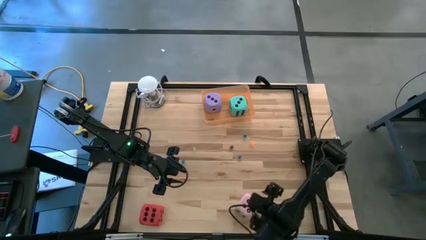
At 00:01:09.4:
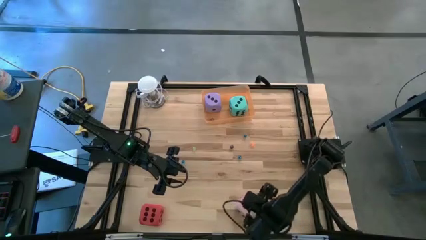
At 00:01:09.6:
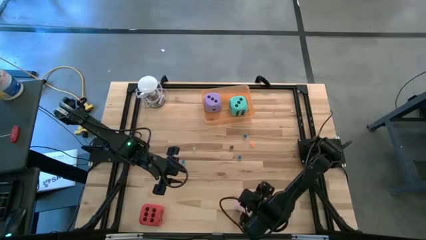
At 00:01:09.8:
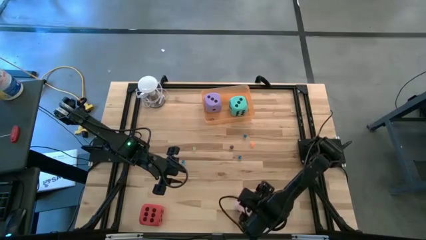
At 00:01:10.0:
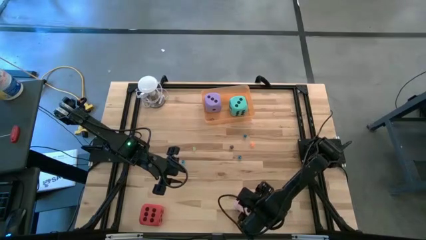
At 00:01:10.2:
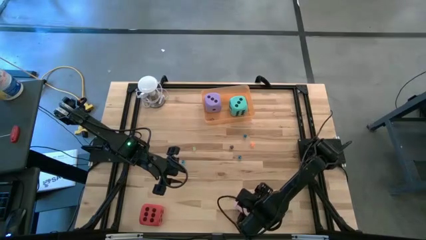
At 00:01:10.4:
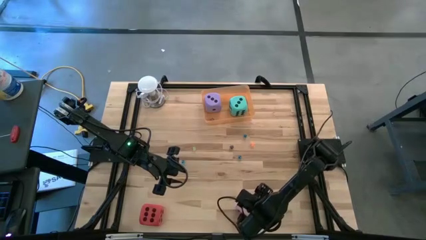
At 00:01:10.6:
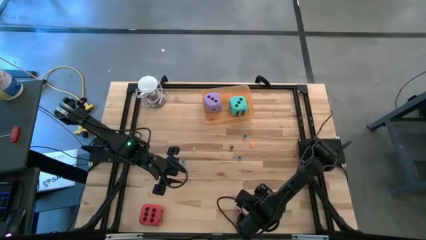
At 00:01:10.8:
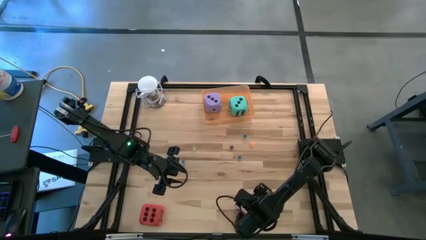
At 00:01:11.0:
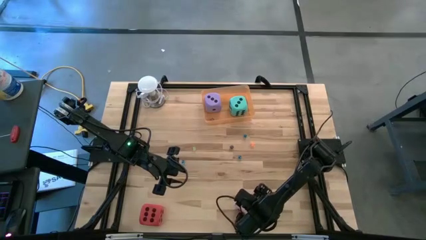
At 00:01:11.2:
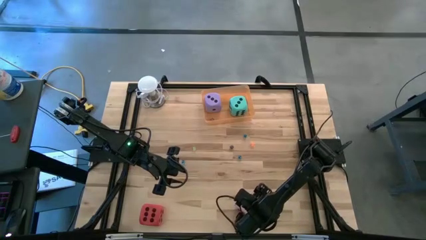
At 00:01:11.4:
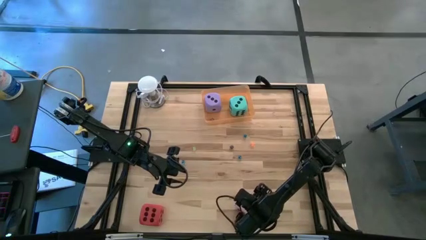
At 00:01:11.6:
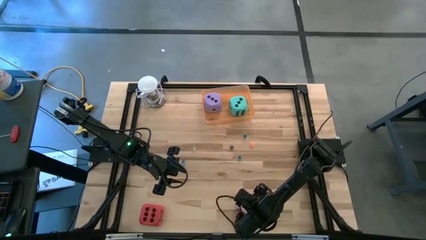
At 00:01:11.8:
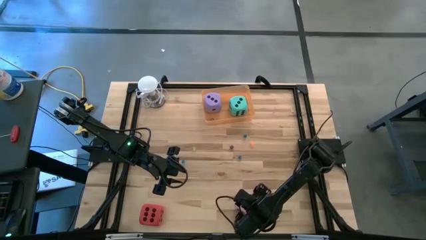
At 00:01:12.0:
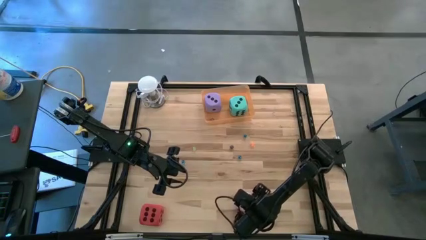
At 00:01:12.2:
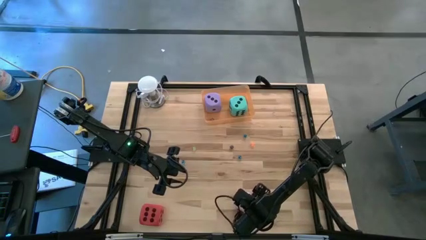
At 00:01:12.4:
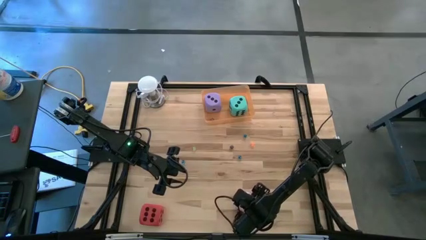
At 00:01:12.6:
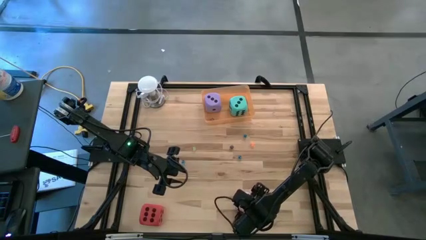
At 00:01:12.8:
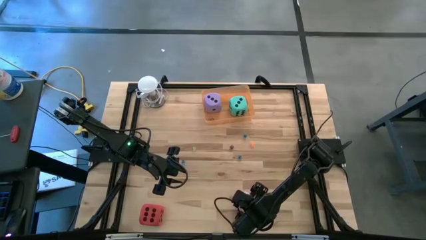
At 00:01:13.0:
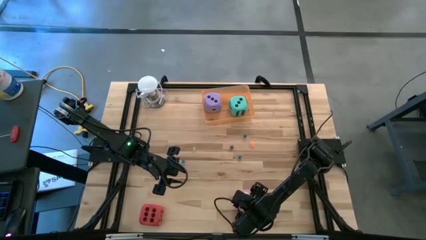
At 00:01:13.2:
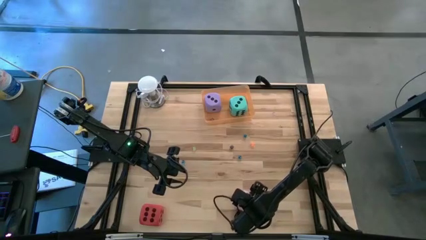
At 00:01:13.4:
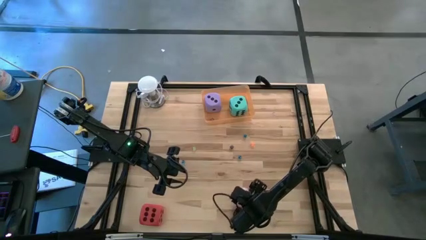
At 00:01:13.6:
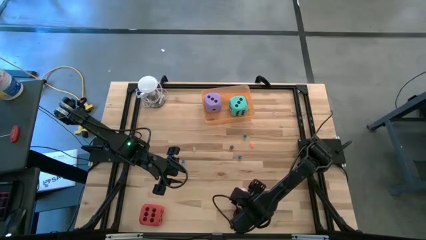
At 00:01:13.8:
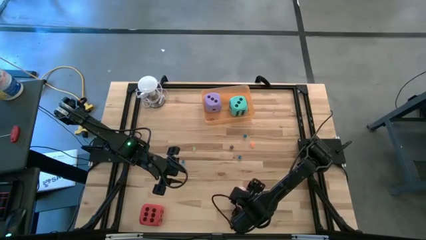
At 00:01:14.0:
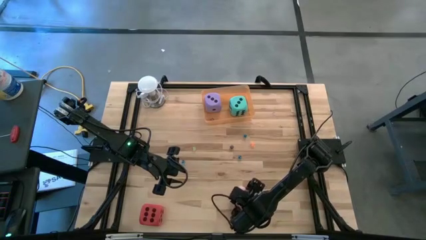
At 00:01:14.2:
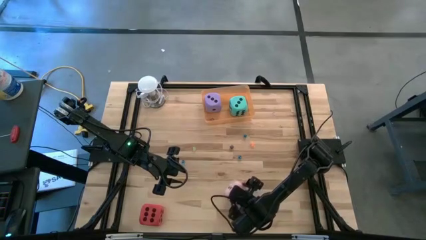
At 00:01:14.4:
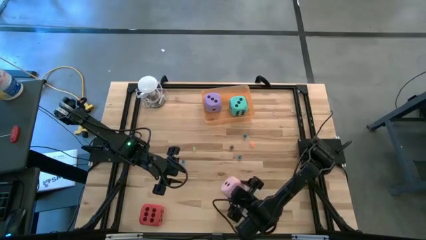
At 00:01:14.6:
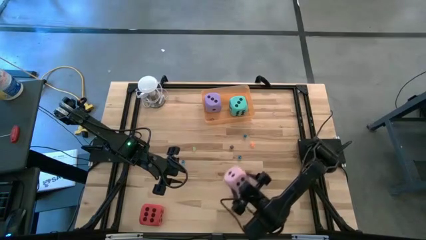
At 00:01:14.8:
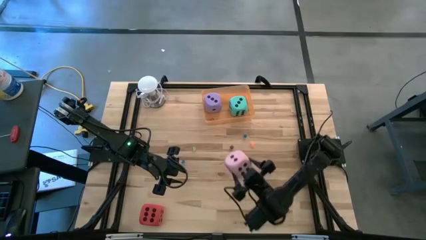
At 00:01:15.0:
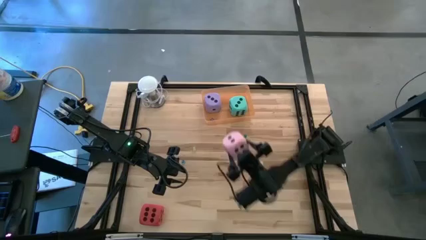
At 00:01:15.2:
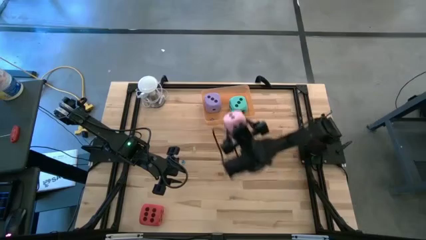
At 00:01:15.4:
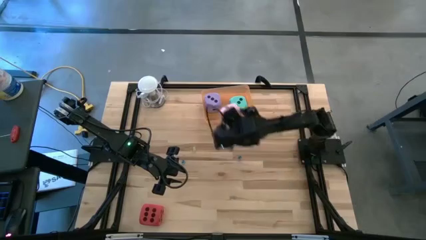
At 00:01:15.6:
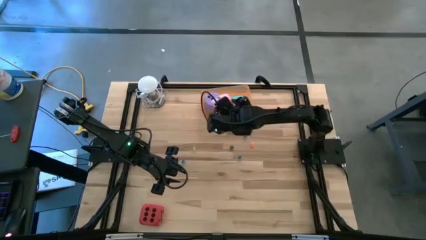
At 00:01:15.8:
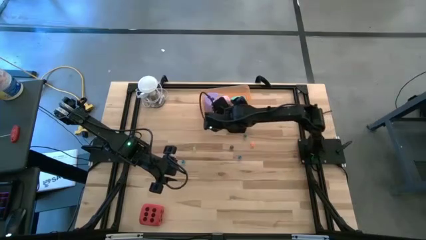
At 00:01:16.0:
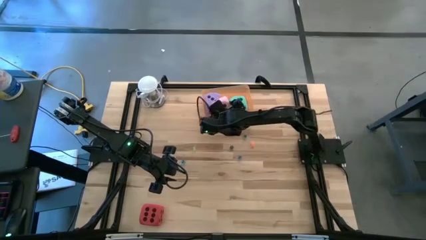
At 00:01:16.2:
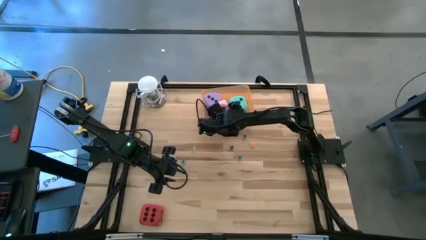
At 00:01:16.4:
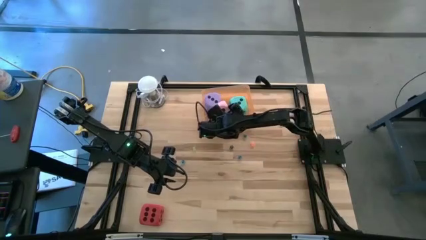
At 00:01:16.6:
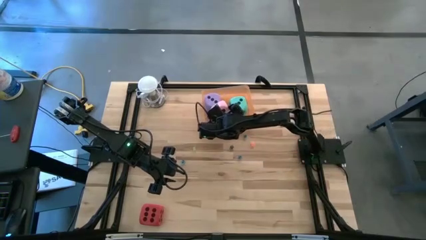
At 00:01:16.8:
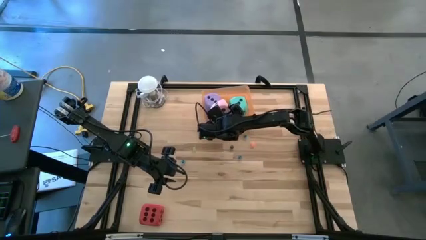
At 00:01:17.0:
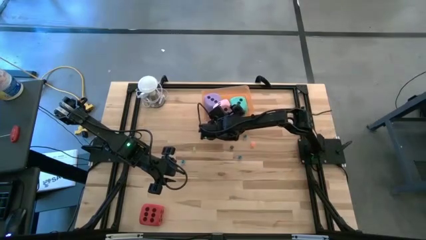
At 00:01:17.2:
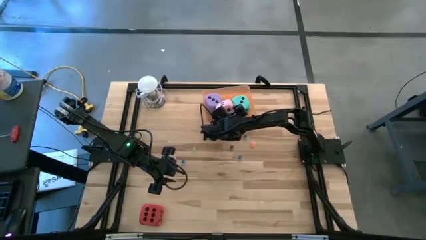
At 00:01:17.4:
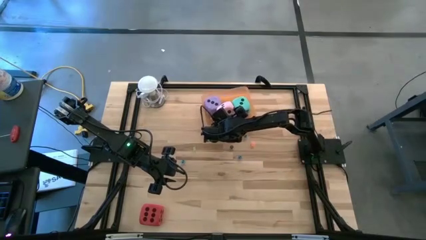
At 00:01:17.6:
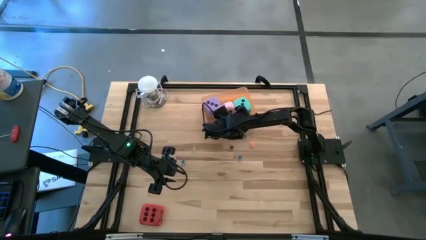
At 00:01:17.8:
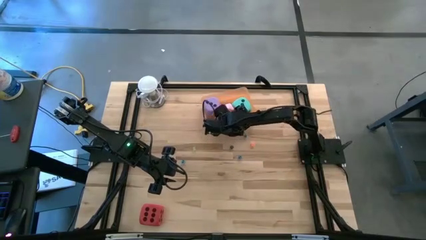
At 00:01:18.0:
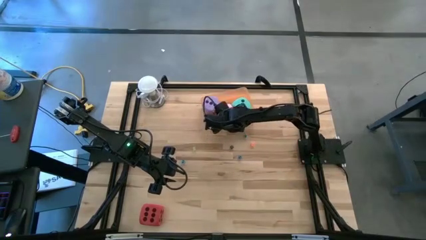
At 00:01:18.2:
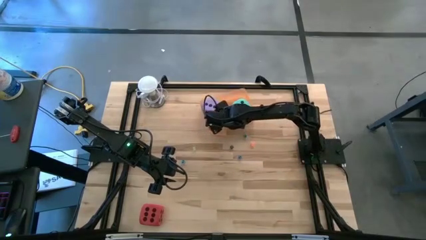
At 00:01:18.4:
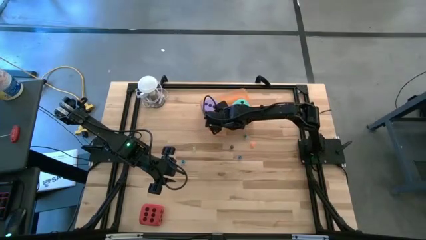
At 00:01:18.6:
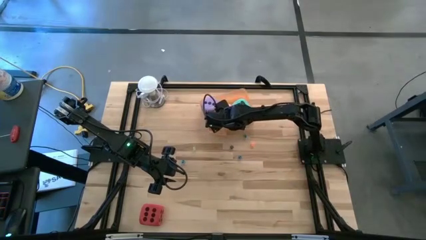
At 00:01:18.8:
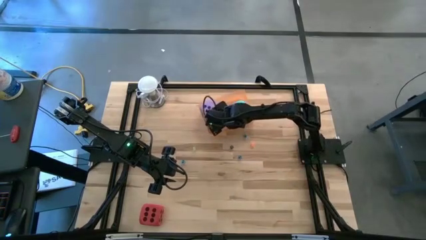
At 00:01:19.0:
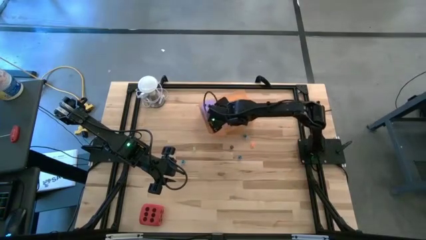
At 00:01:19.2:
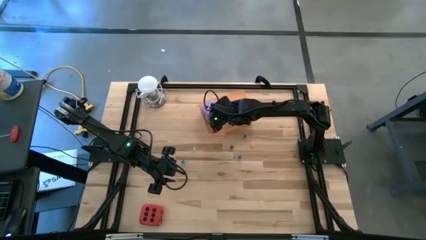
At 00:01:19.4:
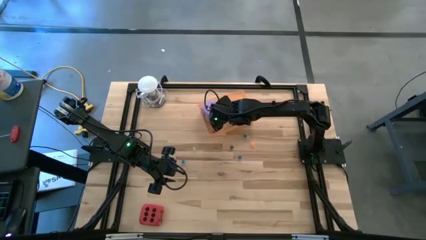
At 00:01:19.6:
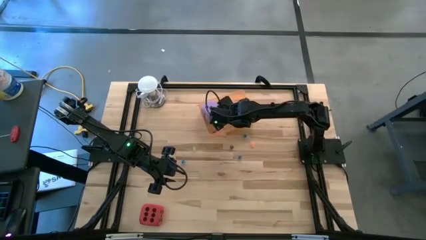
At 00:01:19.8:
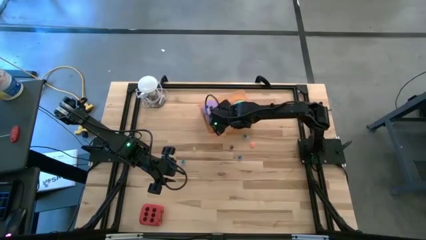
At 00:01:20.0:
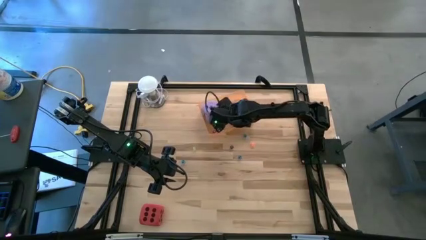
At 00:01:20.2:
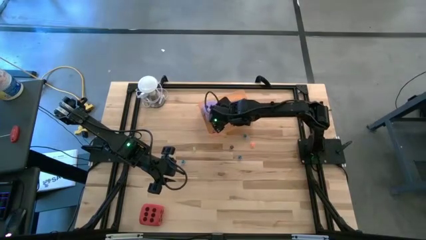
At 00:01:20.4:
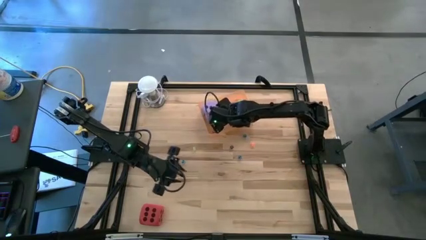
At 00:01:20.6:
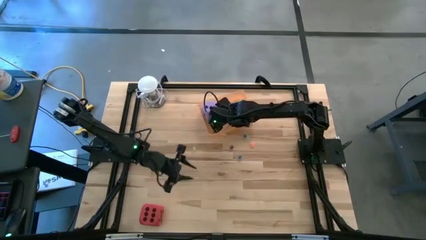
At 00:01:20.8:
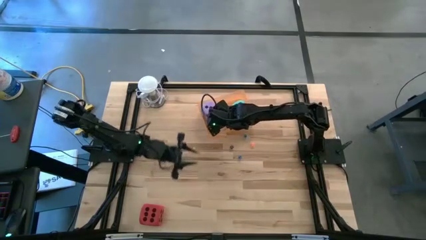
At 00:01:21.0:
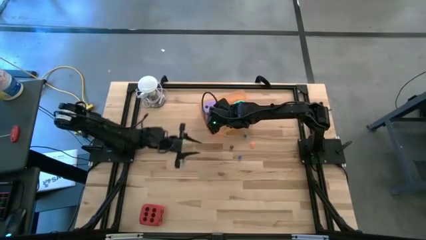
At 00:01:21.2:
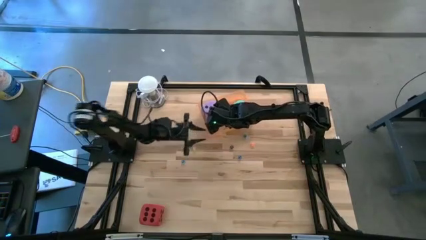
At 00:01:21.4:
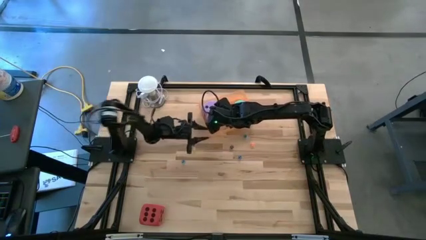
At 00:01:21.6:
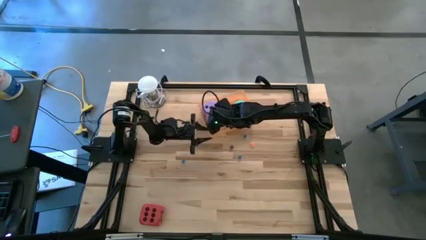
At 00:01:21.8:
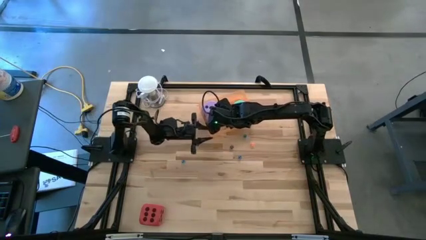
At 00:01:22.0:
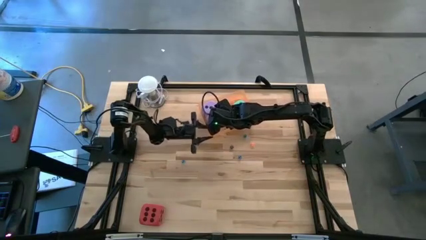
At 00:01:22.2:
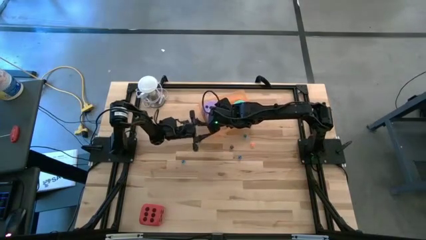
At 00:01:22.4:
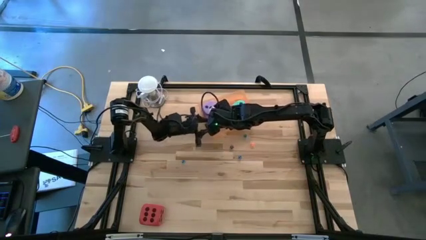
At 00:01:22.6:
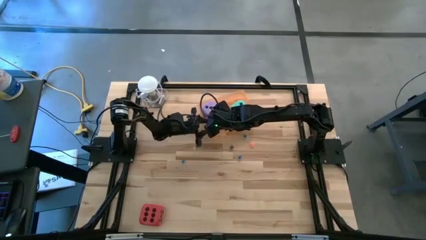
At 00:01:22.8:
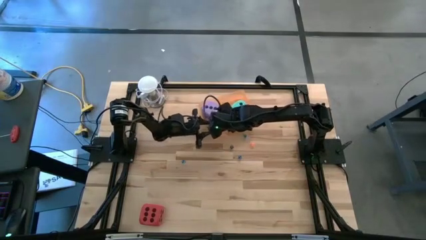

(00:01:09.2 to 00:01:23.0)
Task: Pick & Place Dice
Put the big pink die into the orange bin
